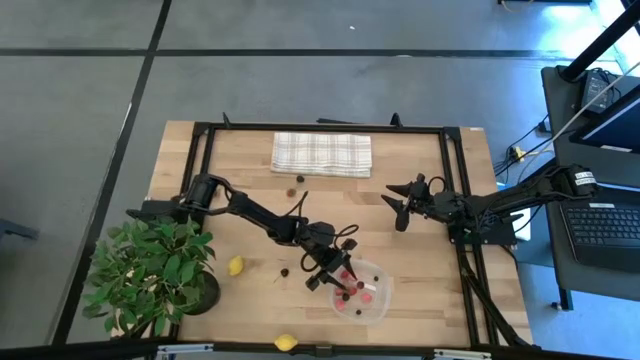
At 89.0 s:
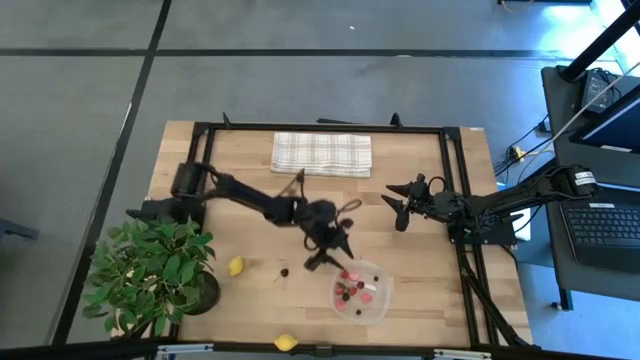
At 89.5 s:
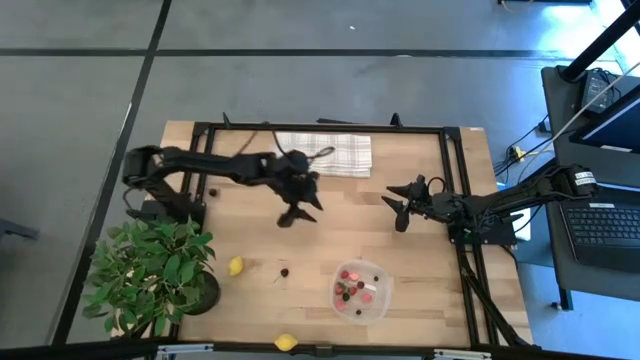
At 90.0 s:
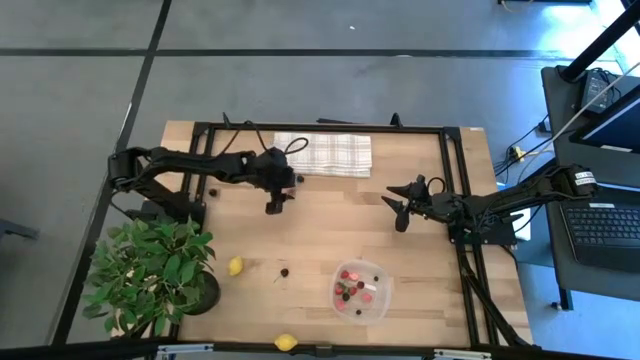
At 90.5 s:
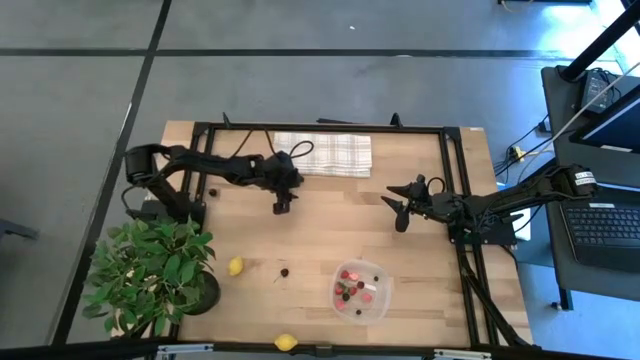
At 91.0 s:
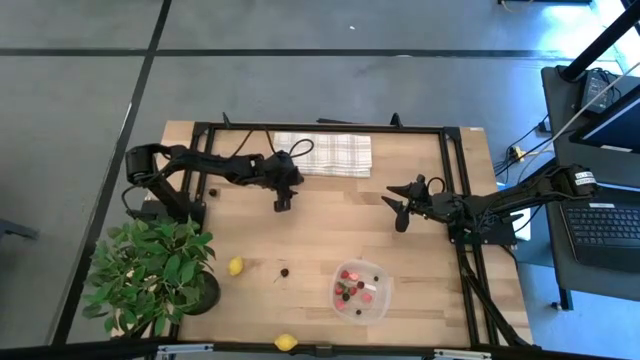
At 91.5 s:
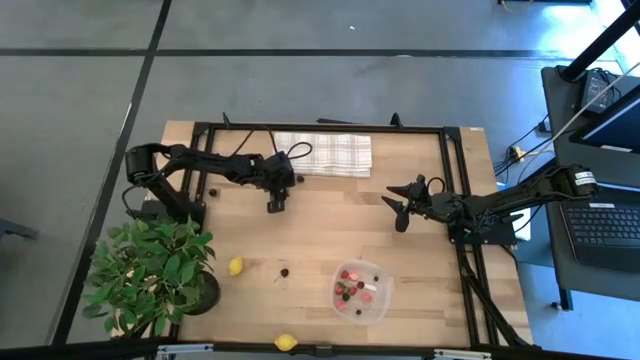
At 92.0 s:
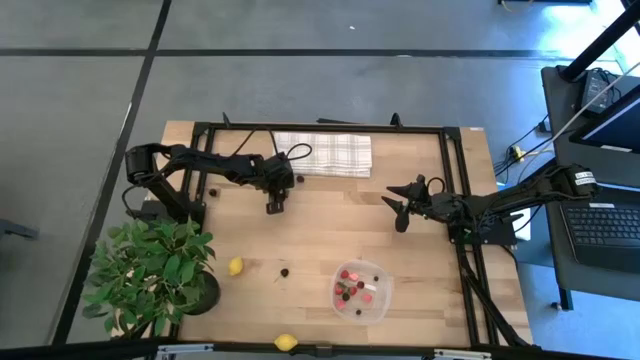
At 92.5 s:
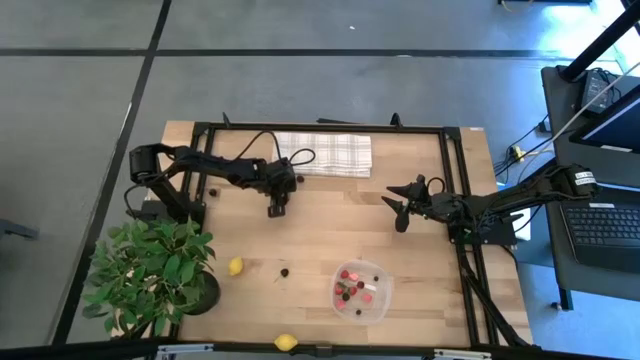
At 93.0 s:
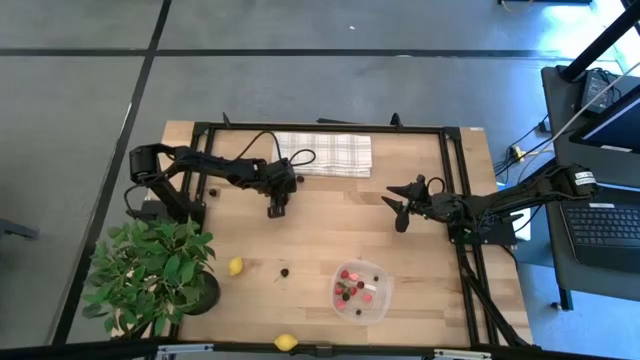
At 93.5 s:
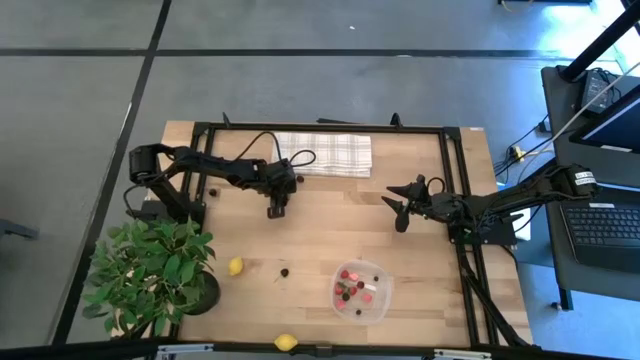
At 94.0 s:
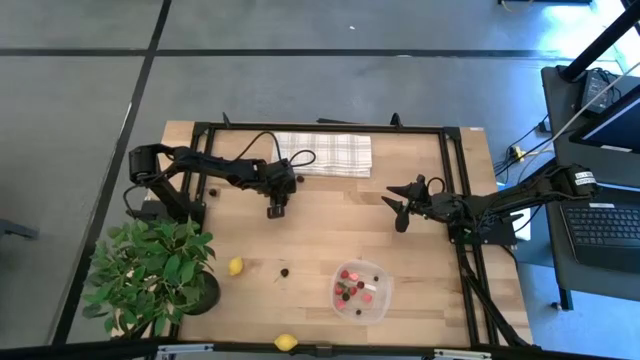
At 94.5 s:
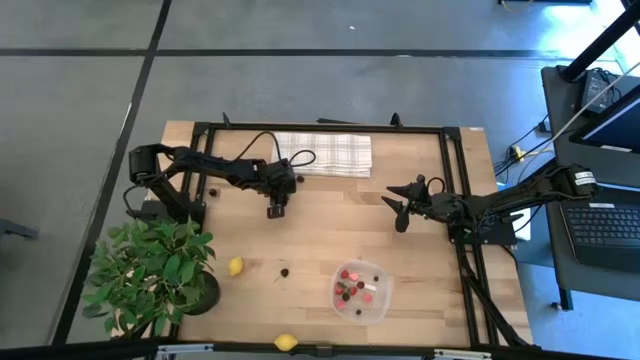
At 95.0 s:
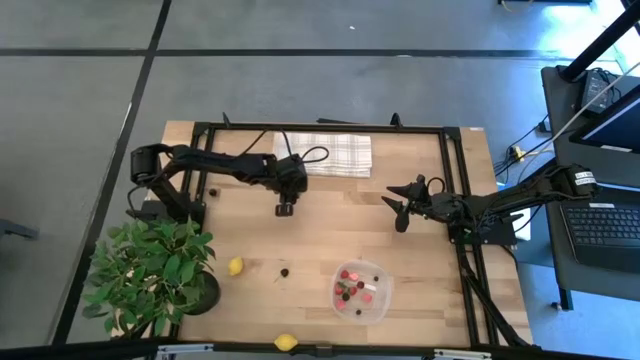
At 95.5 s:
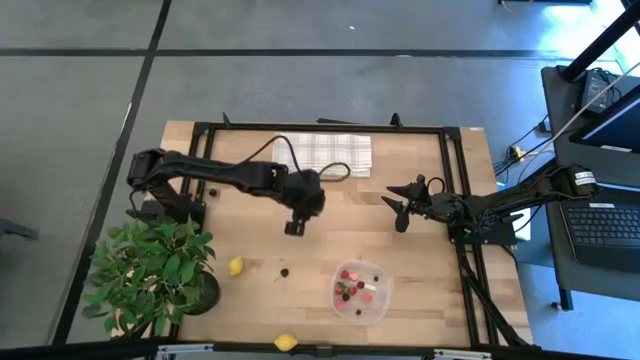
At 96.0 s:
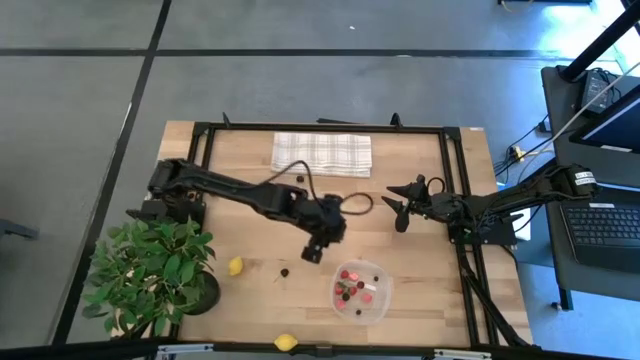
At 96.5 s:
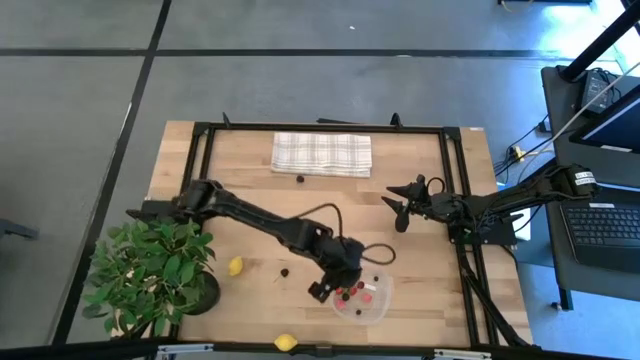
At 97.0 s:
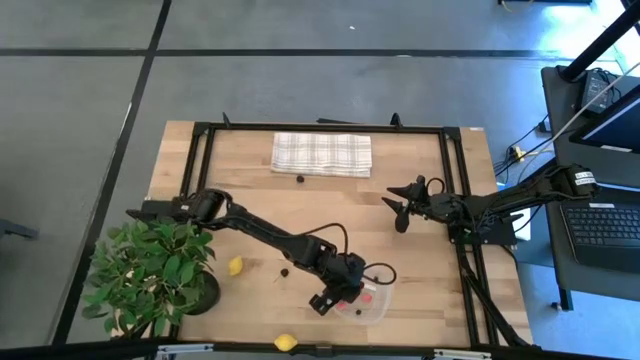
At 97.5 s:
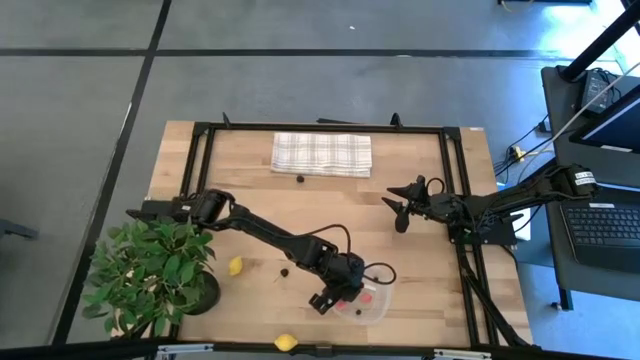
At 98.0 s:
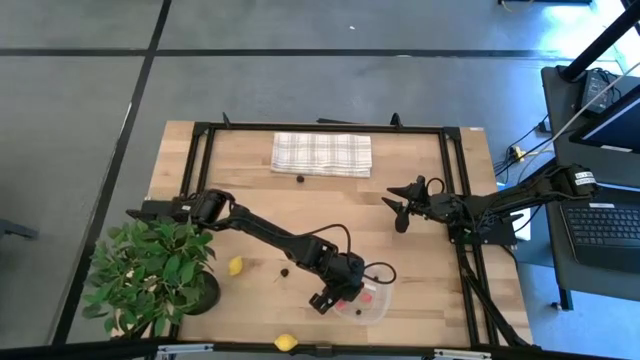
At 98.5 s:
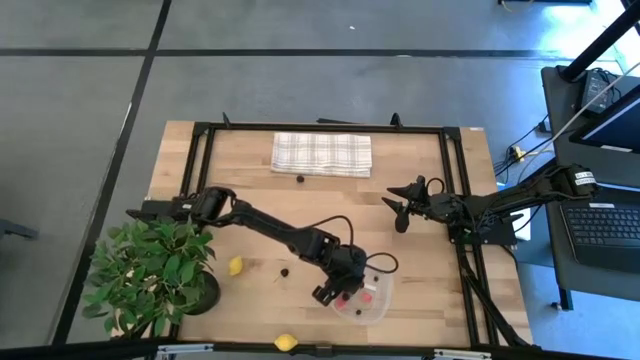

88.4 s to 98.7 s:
Task: Pick and placing Produce into tupperware
Put the red strawberry into the transparent bin

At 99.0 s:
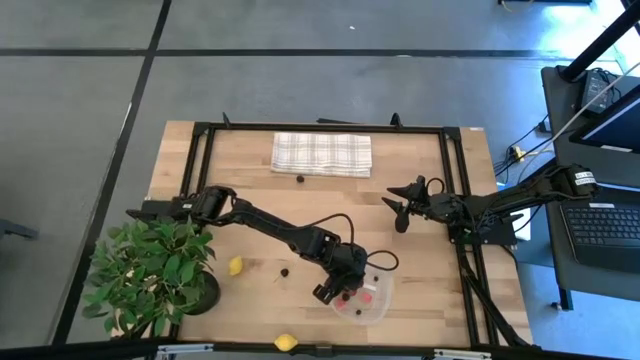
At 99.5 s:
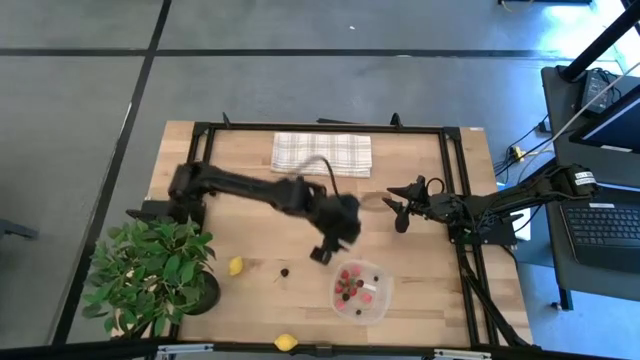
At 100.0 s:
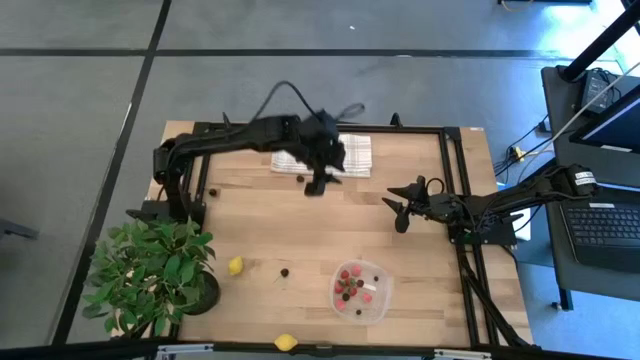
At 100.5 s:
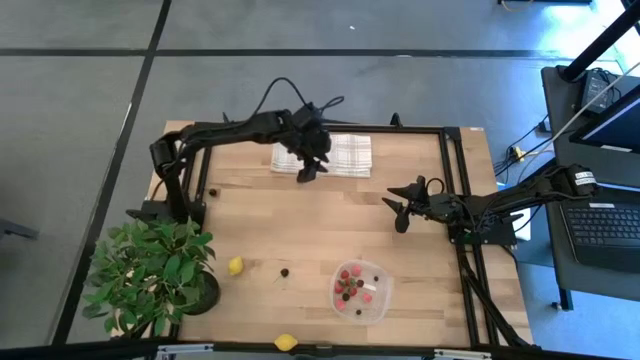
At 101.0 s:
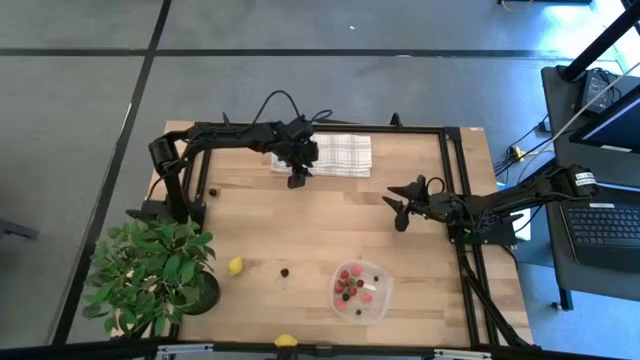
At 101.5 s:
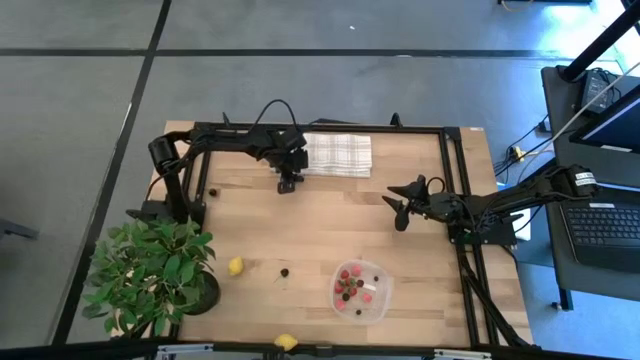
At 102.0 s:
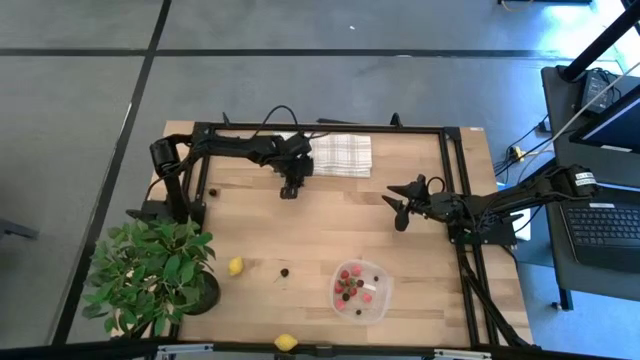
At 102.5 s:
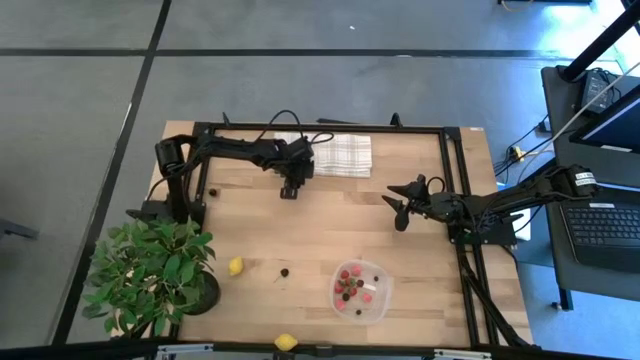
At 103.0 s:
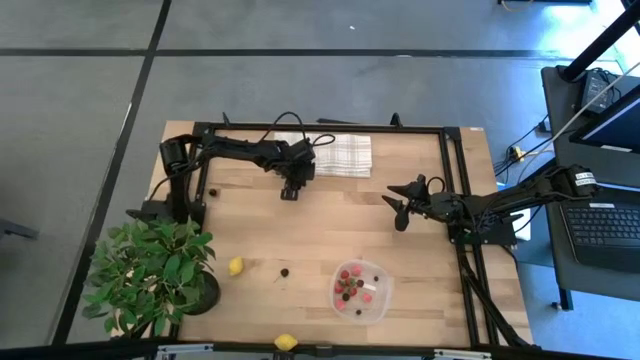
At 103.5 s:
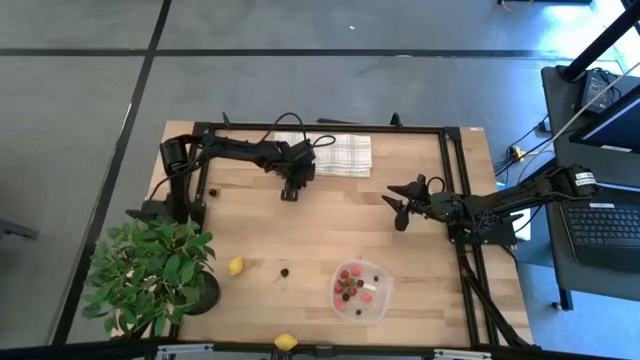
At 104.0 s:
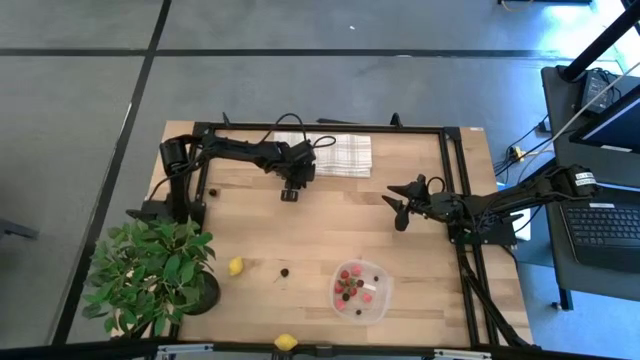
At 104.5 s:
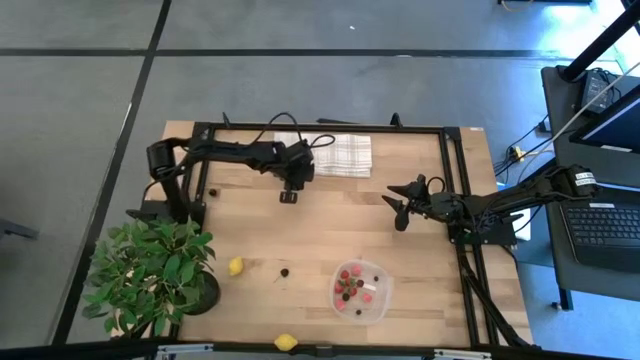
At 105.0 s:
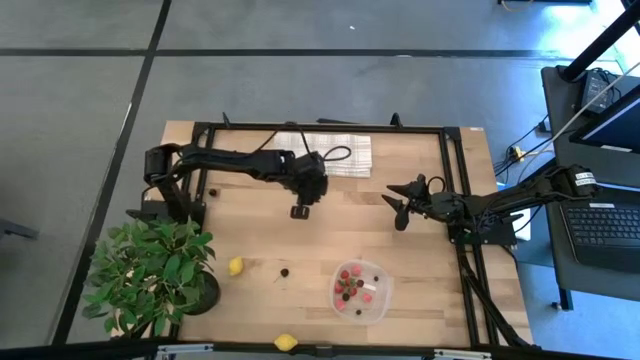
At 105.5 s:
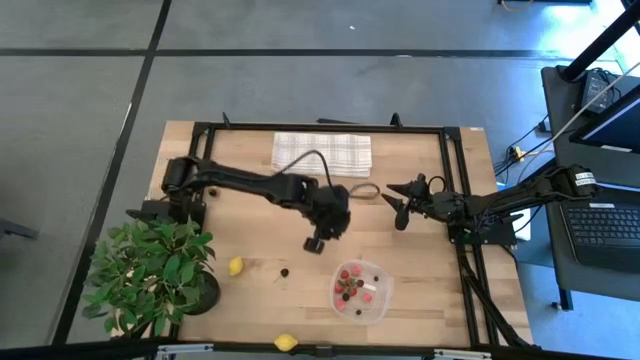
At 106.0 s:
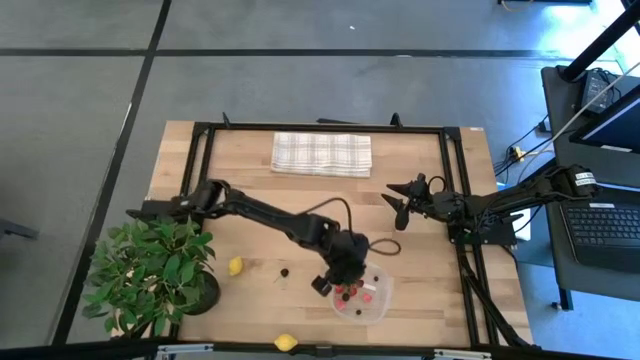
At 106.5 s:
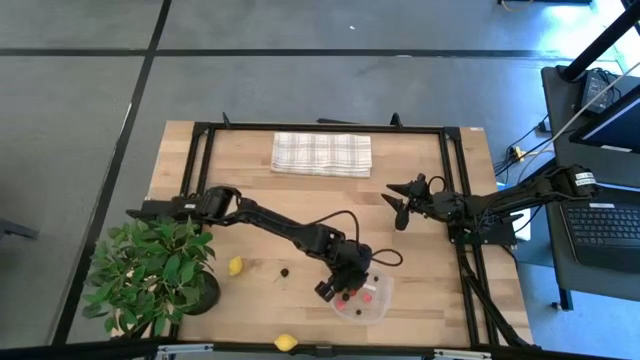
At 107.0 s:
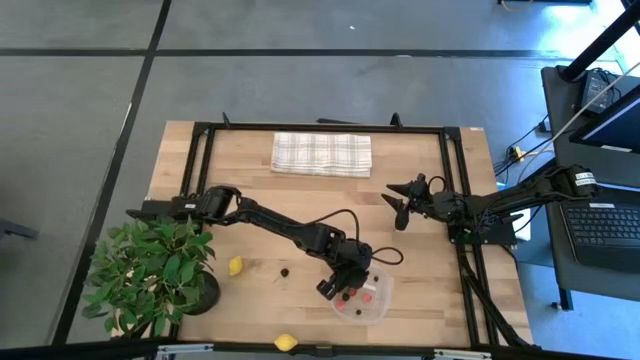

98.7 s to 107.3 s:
Put the dark purple blackberry into the transparent bin

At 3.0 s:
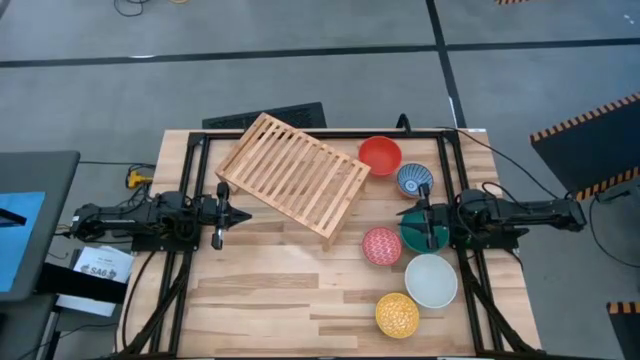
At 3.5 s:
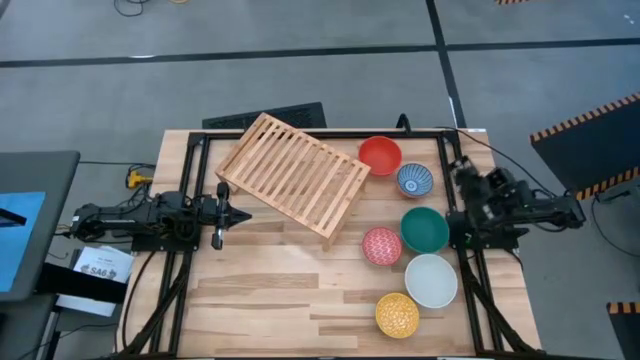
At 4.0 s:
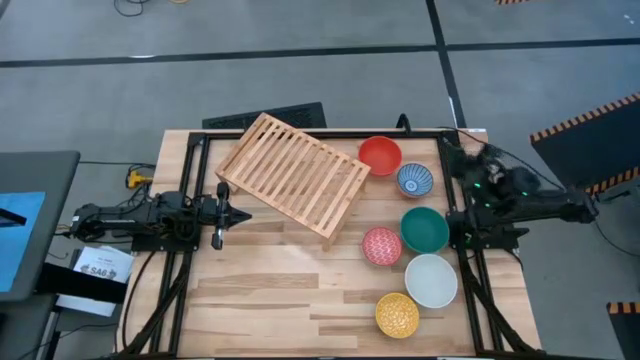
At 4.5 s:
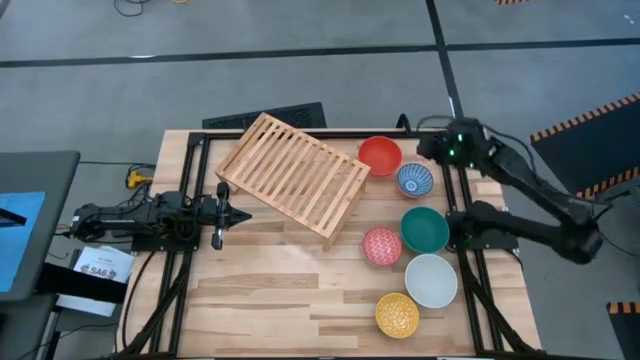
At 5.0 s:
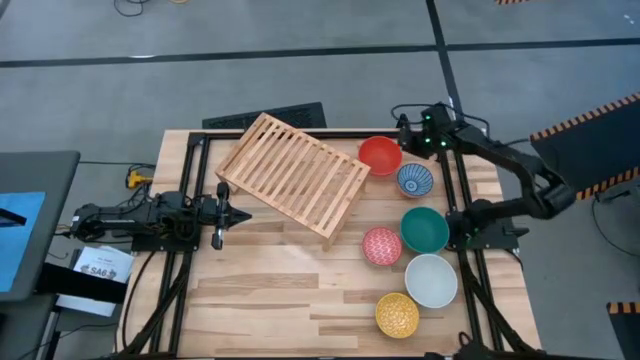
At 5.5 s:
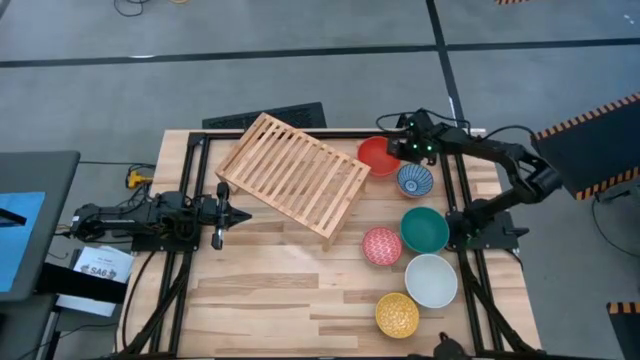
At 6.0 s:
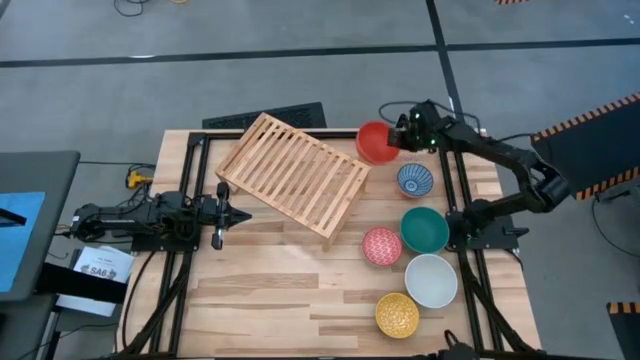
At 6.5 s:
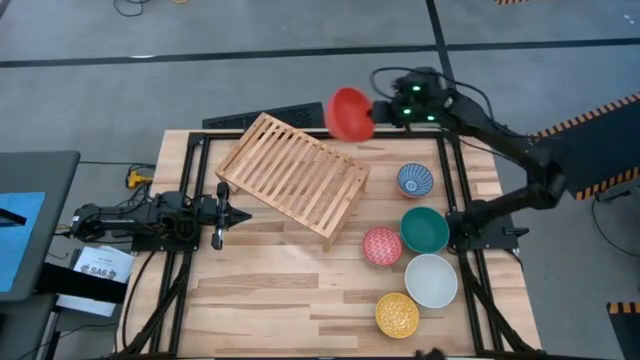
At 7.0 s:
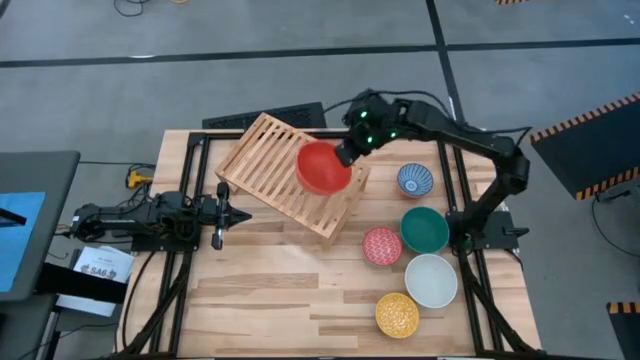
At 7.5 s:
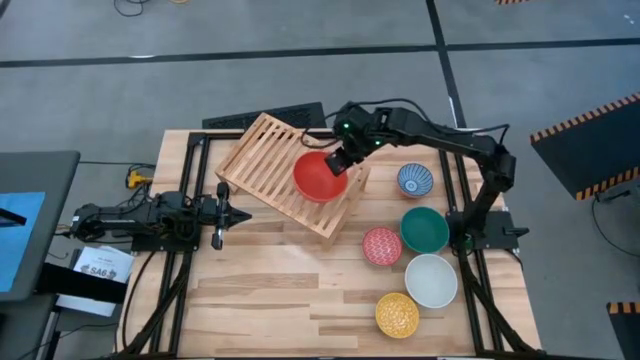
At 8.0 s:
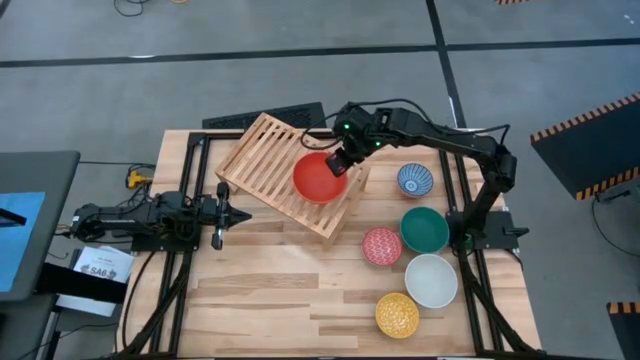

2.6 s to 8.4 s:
Task: Place and stack bowls onto a shelf
Put the orange bowl on the shelf
